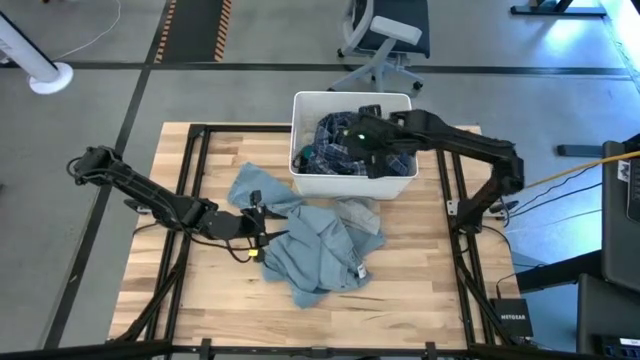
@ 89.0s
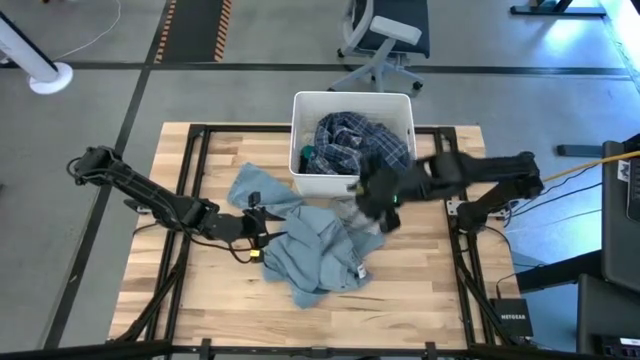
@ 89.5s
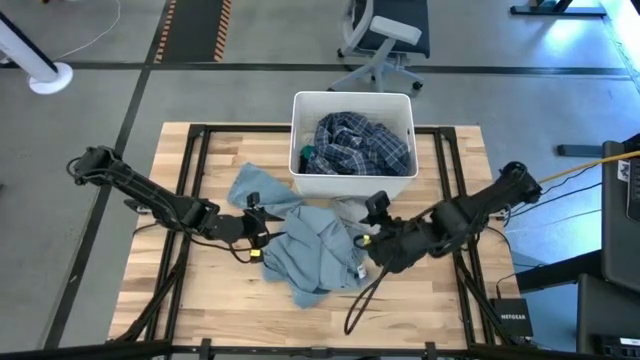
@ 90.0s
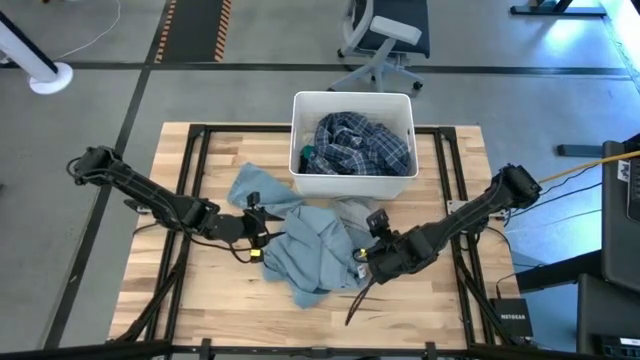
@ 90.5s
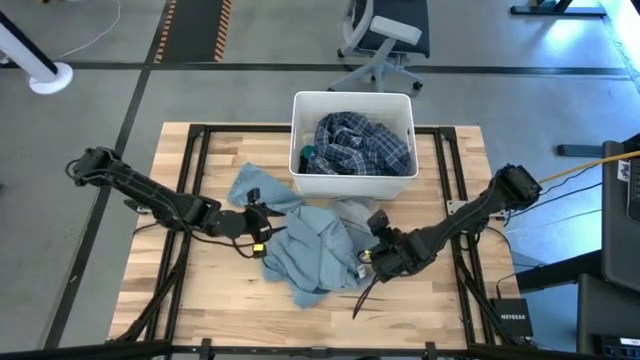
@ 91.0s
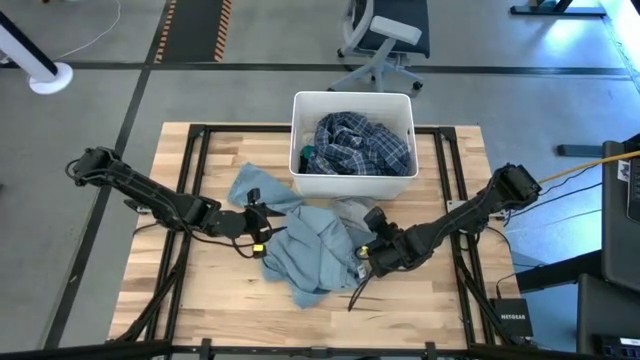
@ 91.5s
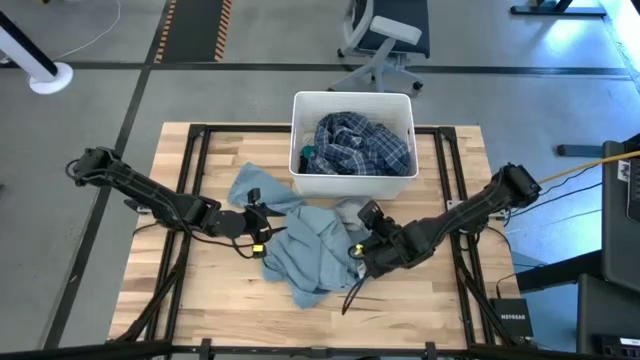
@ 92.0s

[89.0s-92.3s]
Task: Sort clothes
Put the gray underwear into the white laundry bin

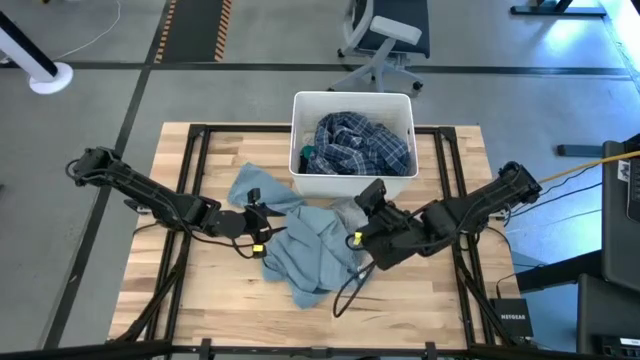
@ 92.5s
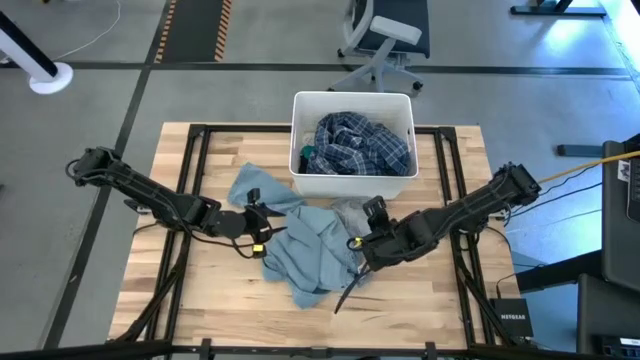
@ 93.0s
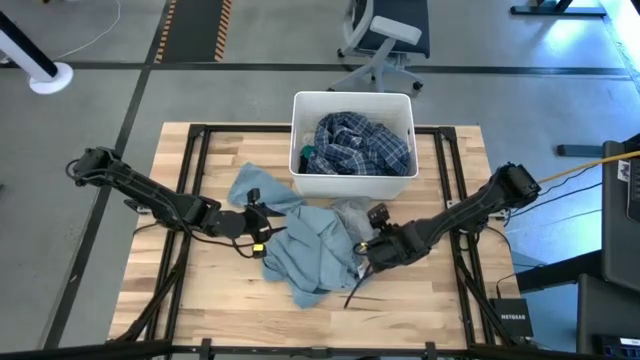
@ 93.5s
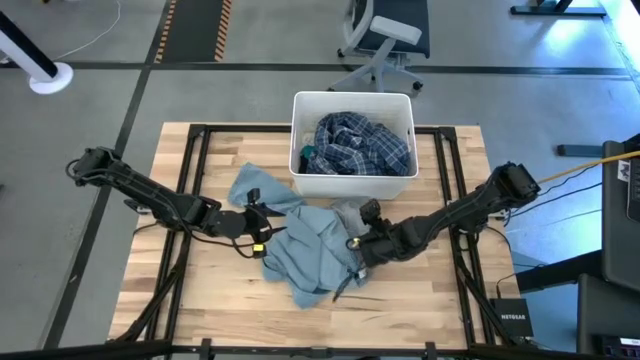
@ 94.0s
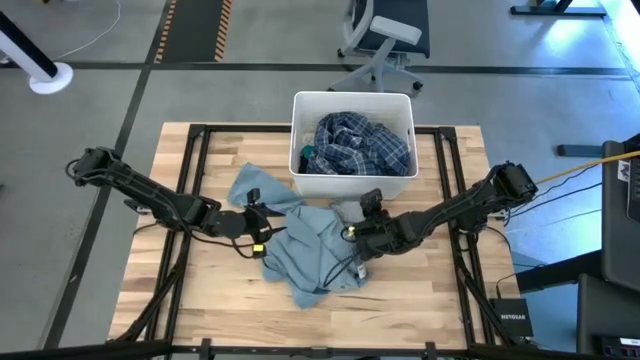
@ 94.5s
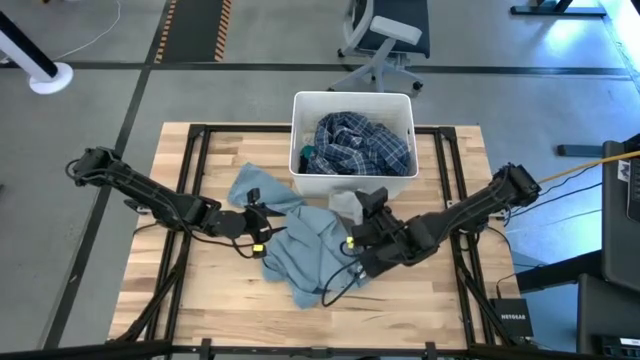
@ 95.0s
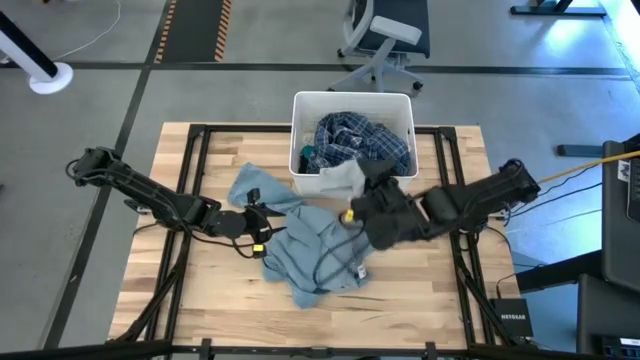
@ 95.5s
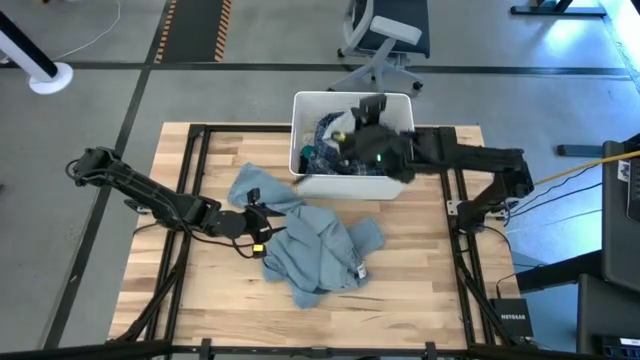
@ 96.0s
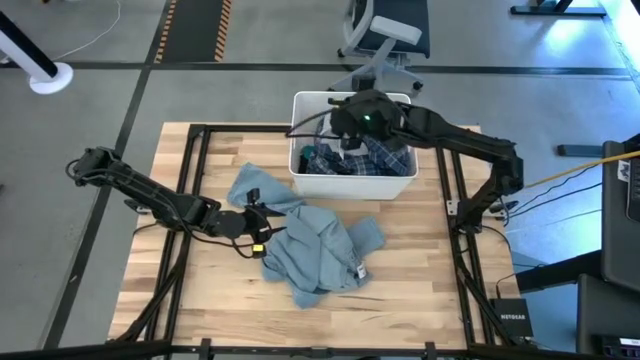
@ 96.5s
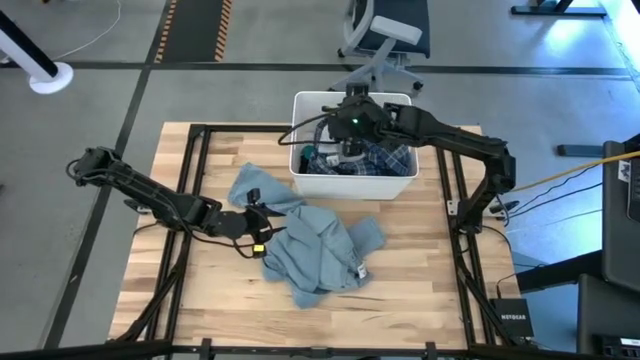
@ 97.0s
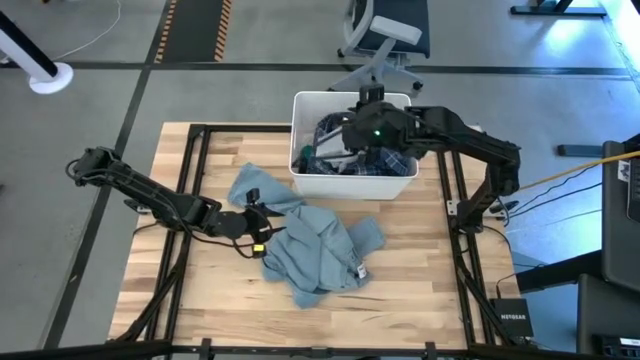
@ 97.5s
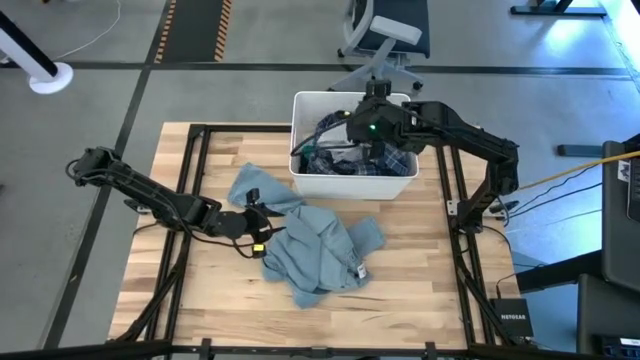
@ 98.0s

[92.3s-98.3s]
Put the gray underwear into the white laundry bin

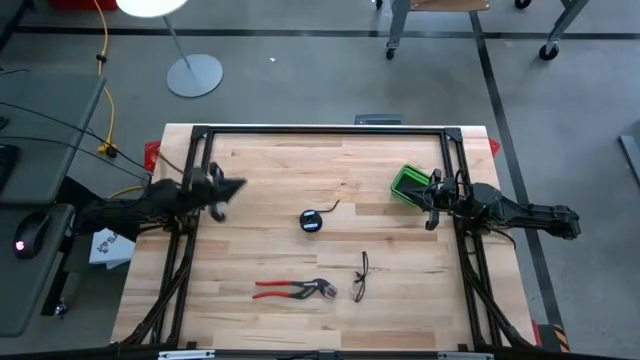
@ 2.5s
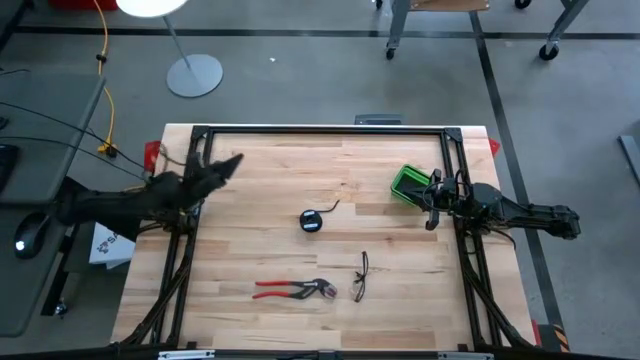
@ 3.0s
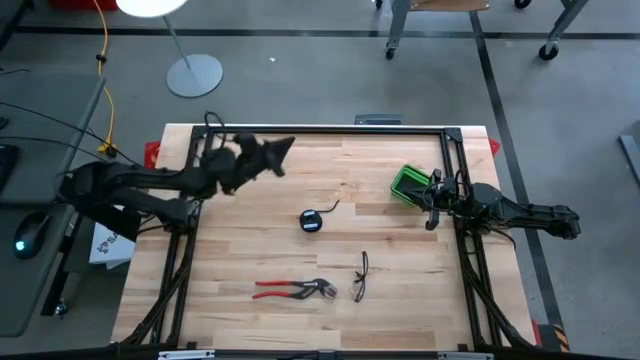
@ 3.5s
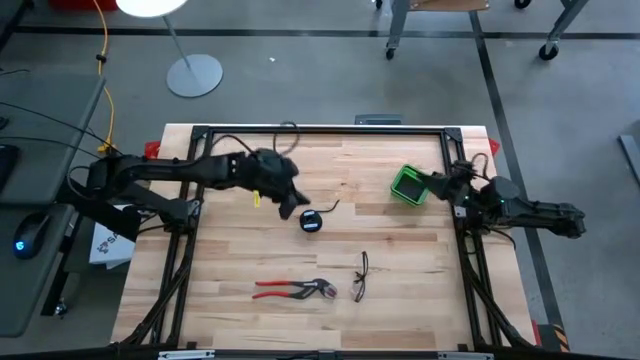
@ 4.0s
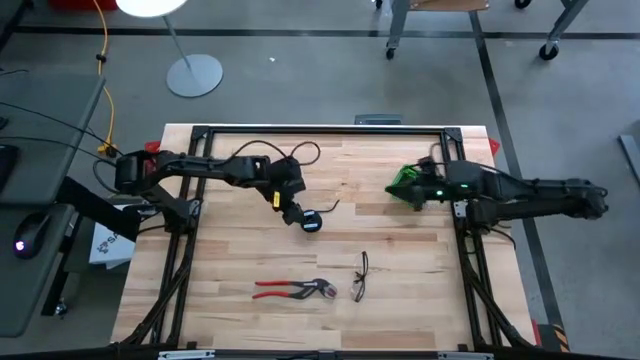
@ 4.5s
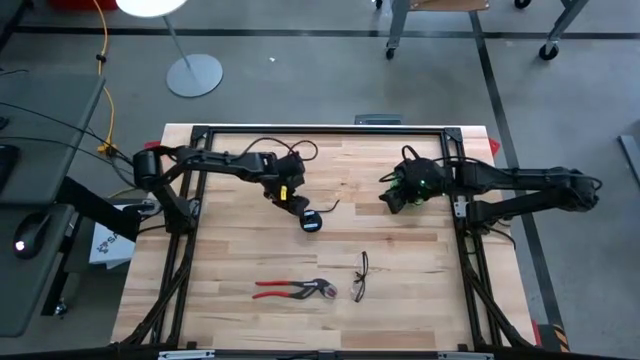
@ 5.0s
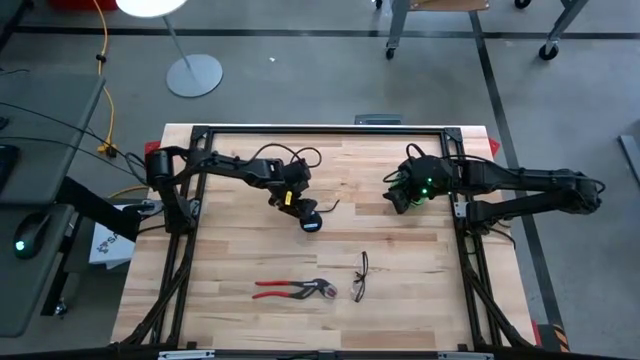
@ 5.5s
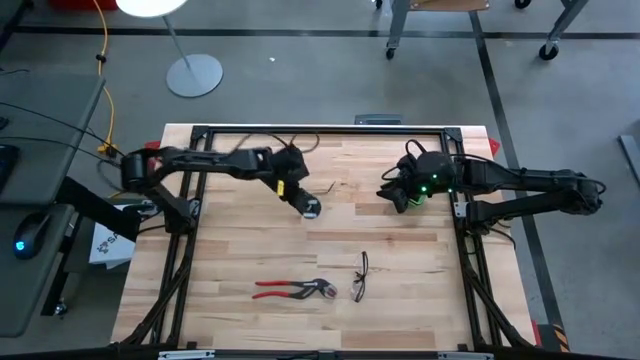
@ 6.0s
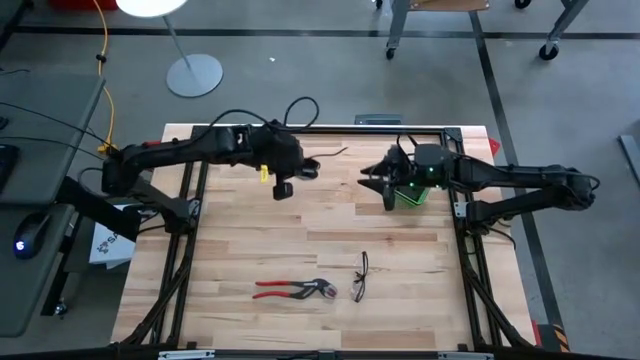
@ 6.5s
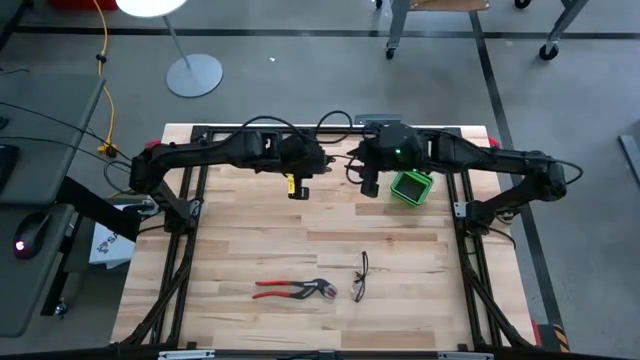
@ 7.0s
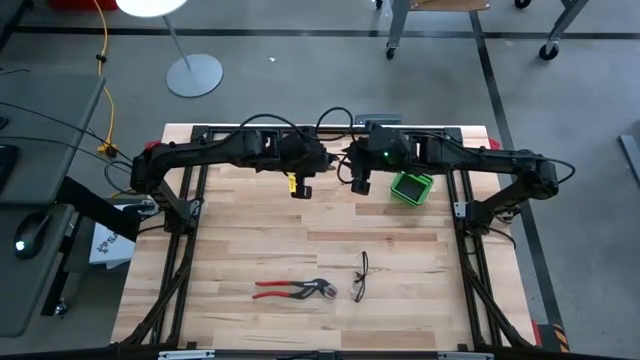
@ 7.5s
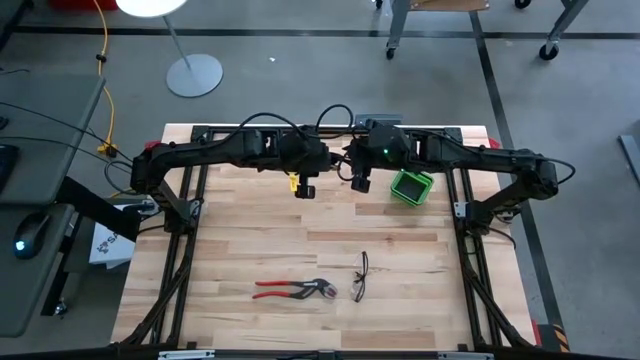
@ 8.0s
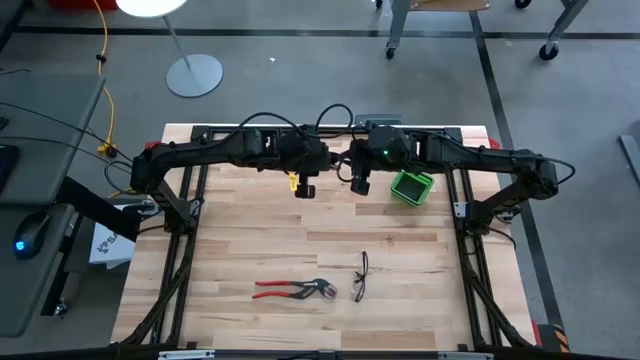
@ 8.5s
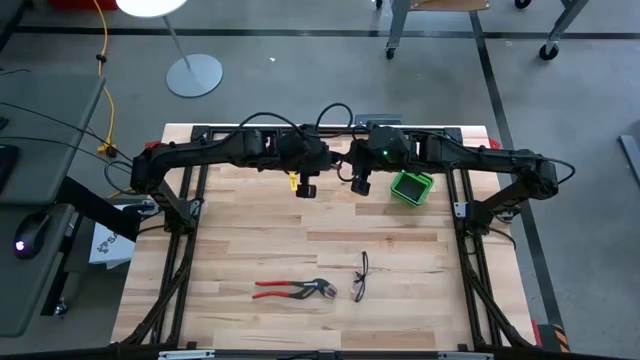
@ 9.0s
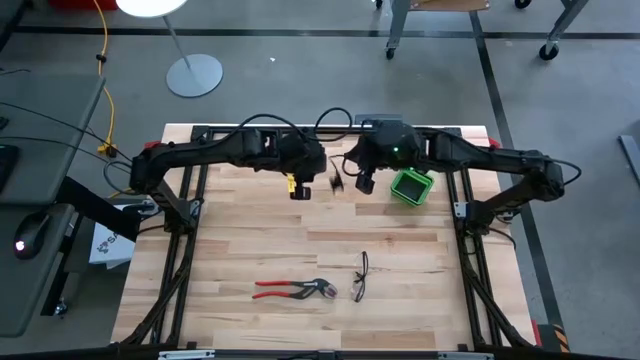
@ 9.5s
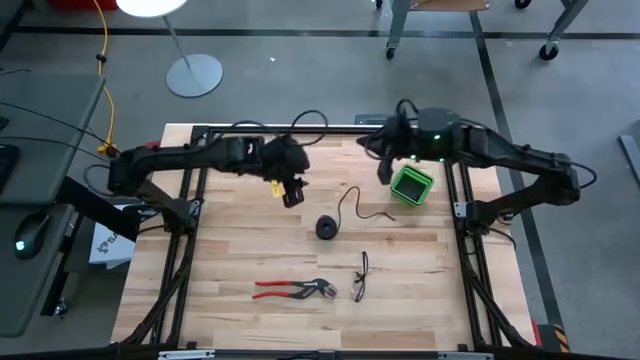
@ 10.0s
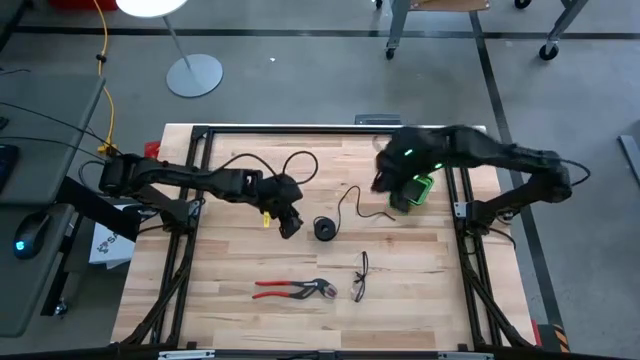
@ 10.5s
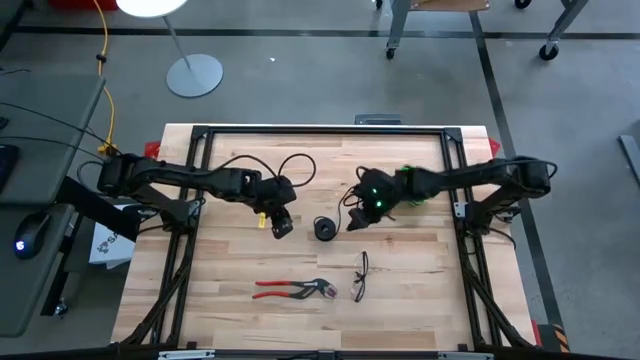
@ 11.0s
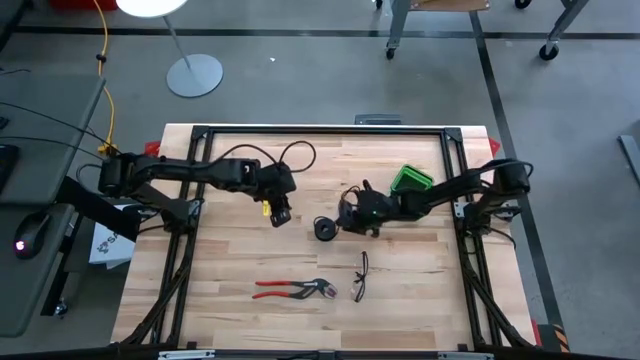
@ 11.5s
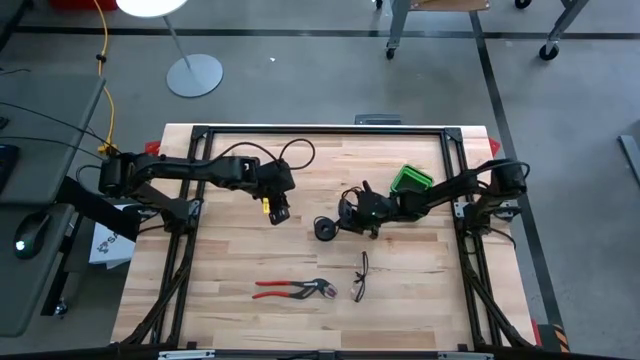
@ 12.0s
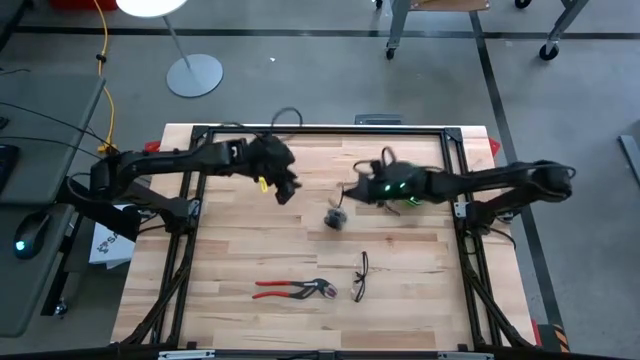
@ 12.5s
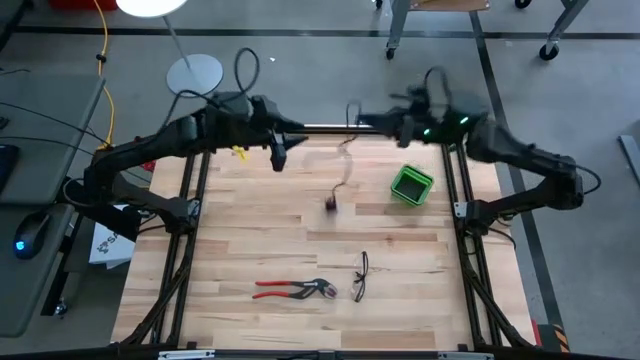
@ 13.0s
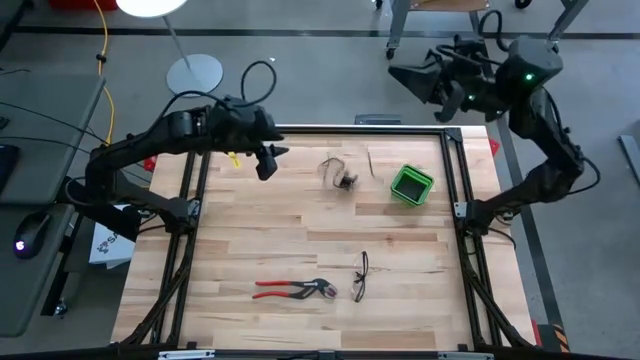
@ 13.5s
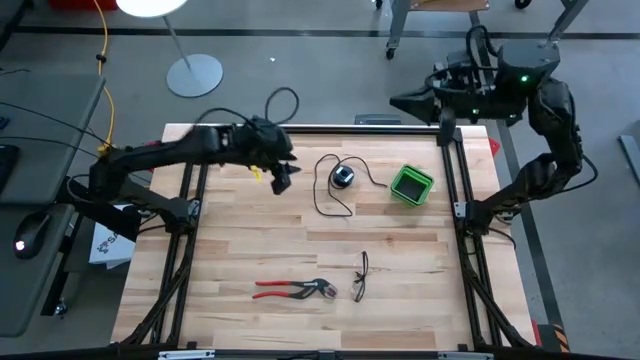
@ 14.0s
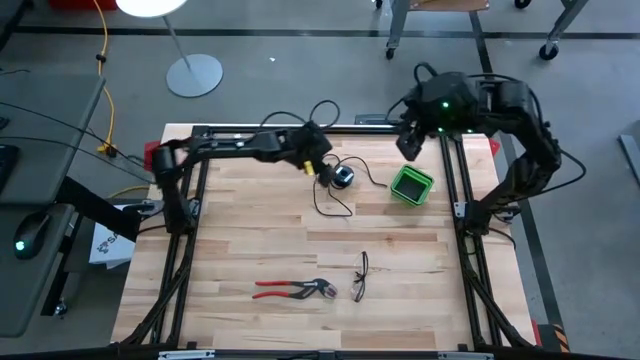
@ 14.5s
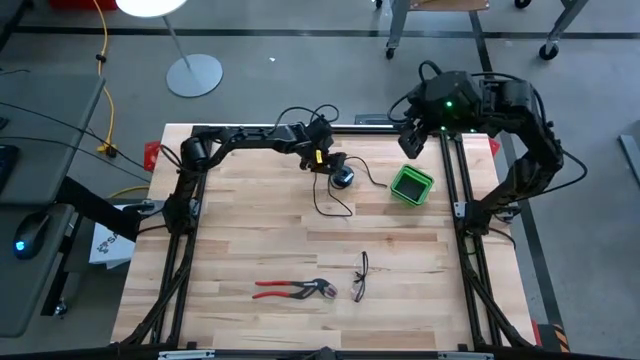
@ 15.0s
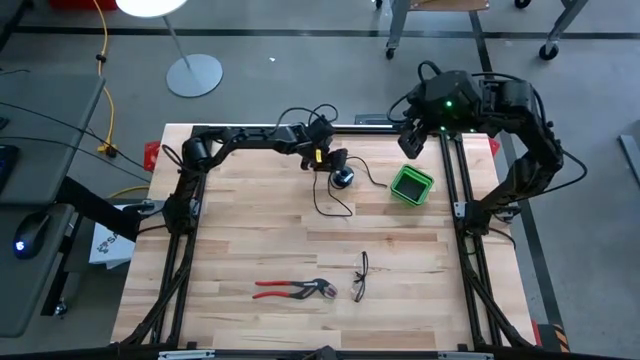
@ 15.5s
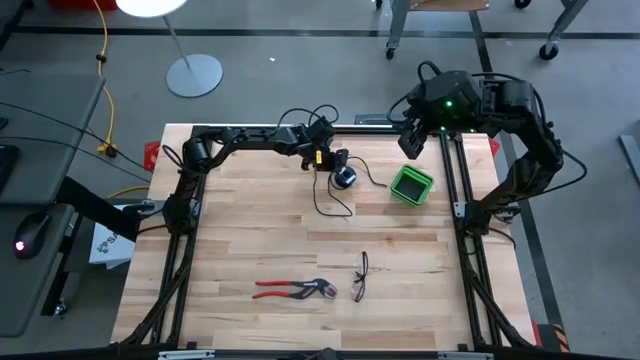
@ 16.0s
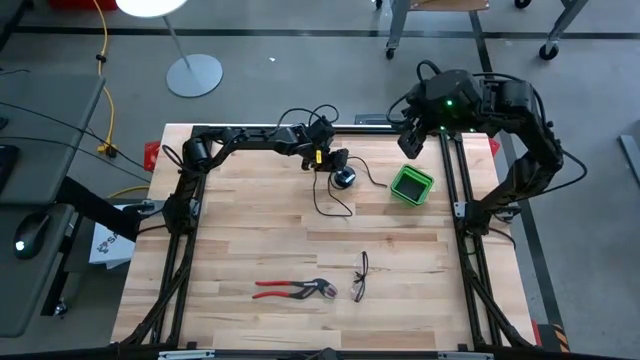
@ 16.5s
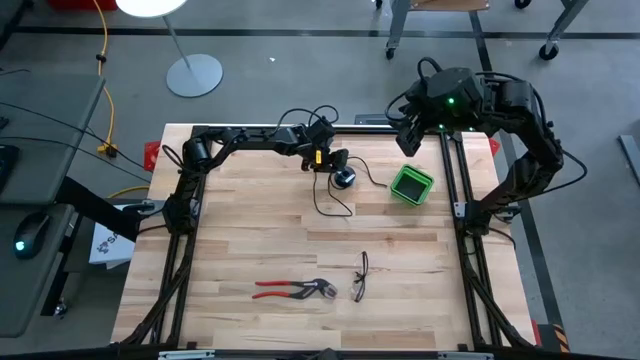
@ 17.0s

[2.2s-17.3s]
Task: Coil cords
Uncoil the black wire from the black spool
